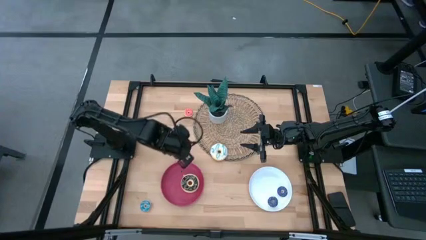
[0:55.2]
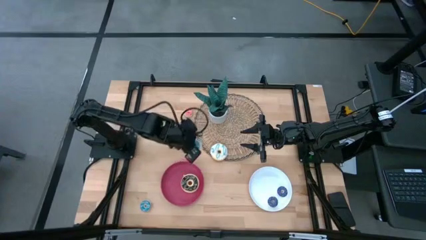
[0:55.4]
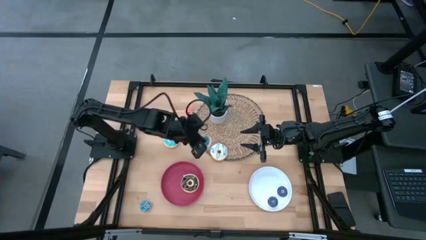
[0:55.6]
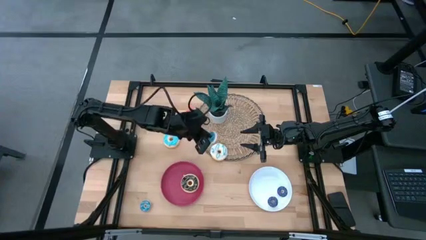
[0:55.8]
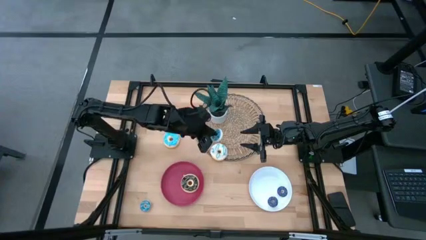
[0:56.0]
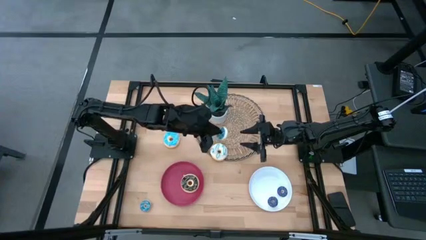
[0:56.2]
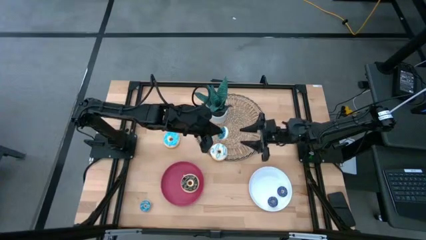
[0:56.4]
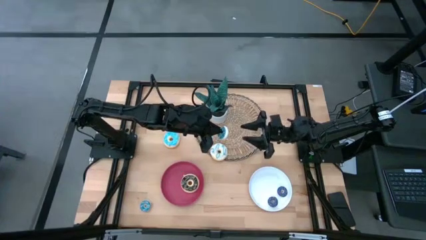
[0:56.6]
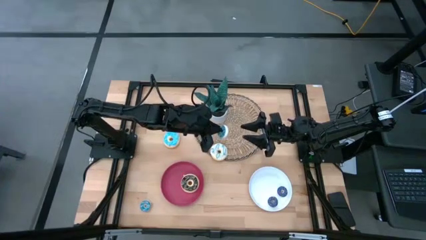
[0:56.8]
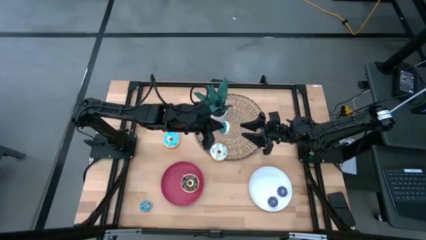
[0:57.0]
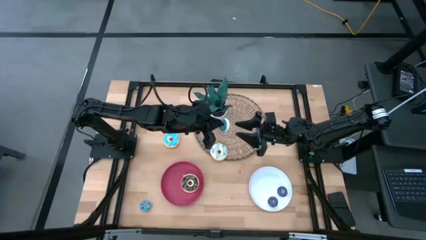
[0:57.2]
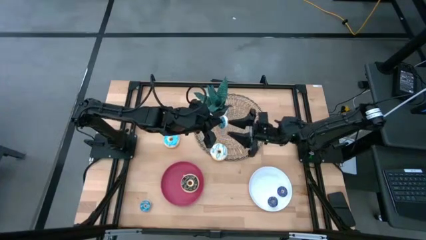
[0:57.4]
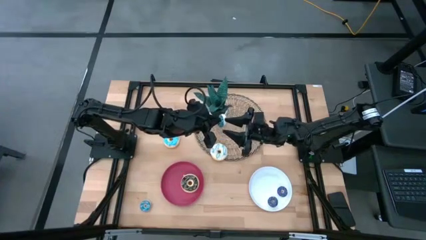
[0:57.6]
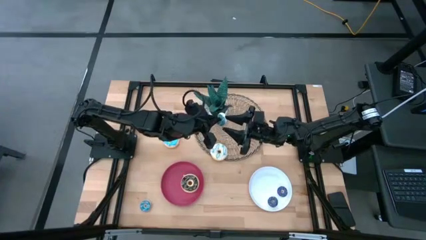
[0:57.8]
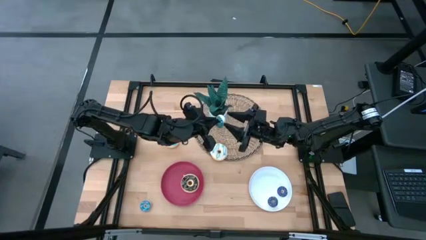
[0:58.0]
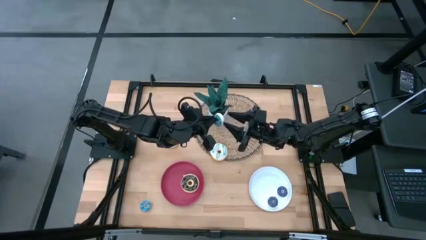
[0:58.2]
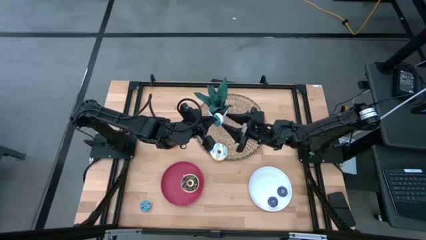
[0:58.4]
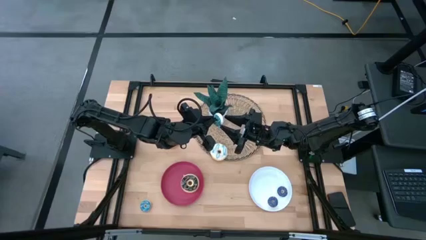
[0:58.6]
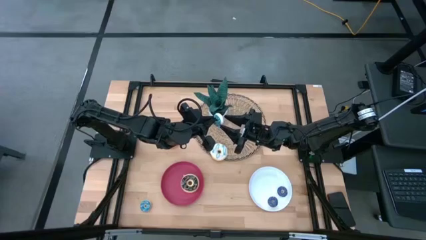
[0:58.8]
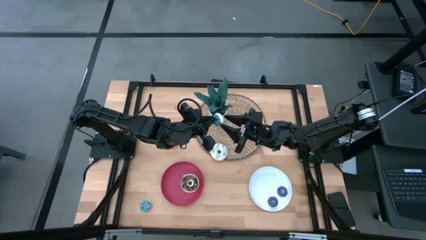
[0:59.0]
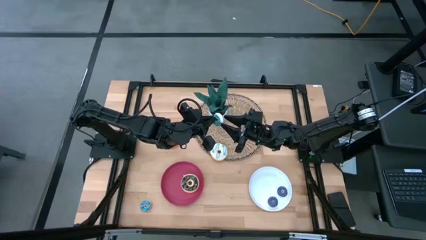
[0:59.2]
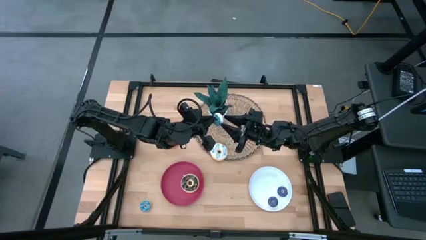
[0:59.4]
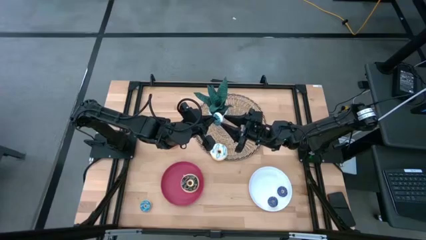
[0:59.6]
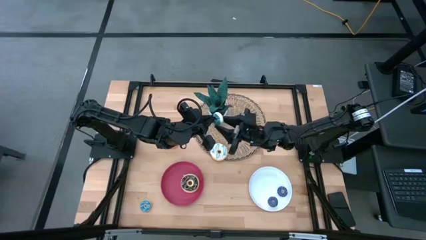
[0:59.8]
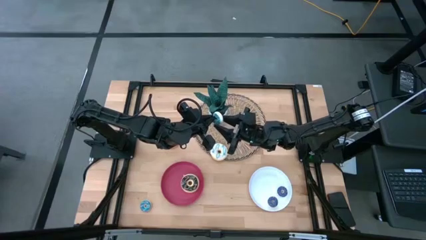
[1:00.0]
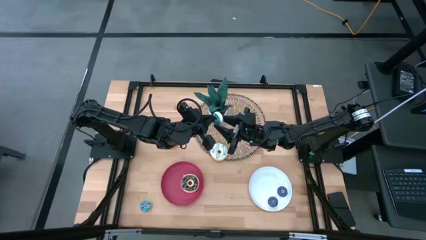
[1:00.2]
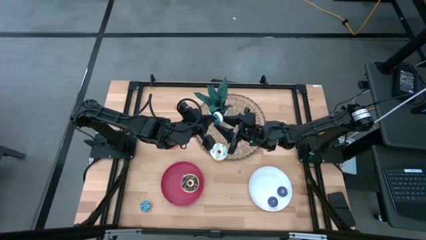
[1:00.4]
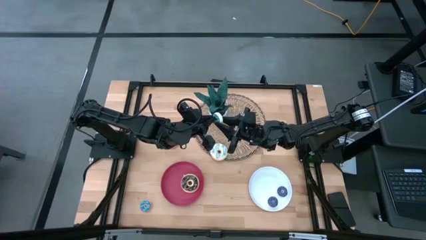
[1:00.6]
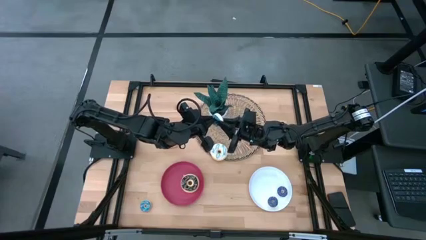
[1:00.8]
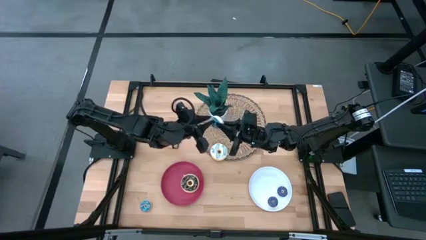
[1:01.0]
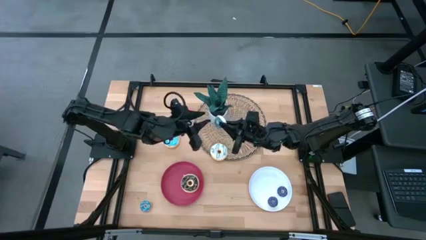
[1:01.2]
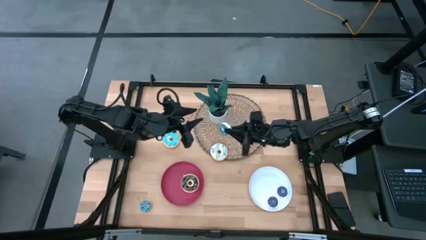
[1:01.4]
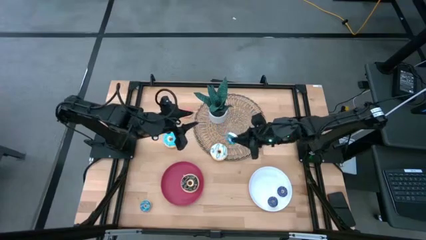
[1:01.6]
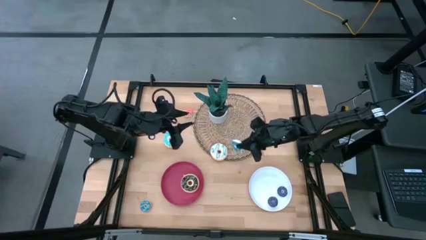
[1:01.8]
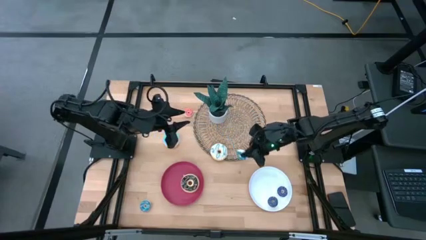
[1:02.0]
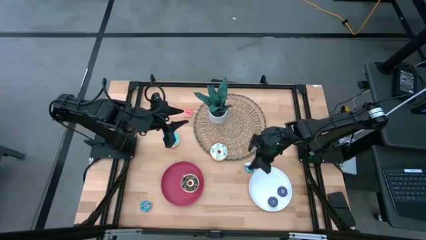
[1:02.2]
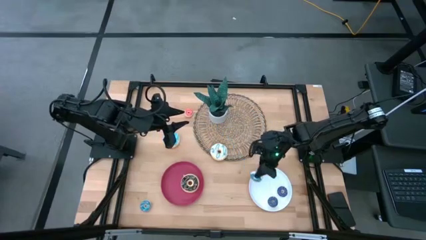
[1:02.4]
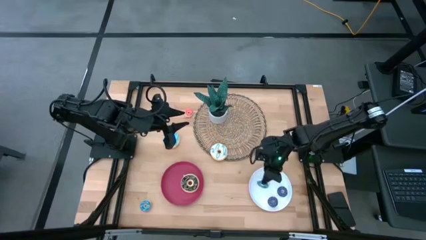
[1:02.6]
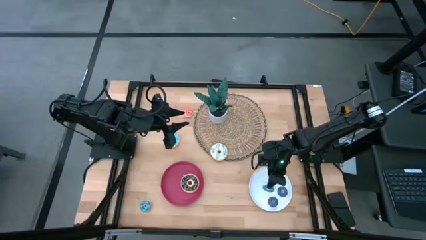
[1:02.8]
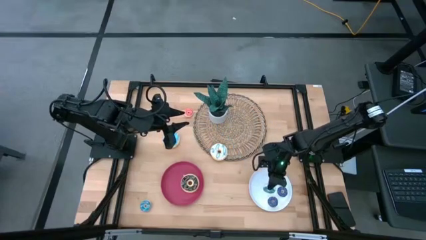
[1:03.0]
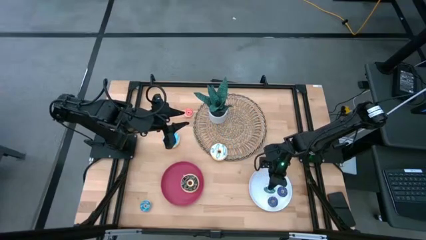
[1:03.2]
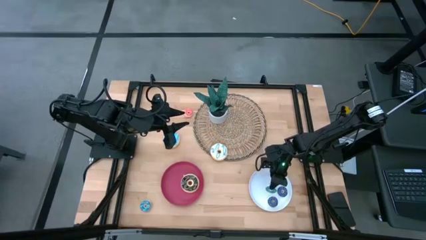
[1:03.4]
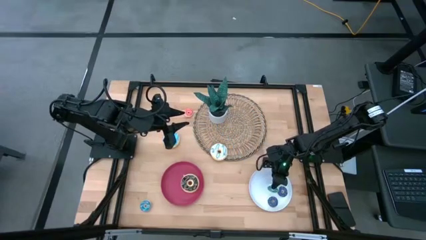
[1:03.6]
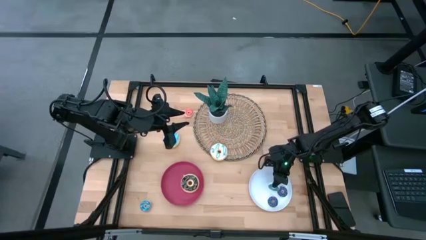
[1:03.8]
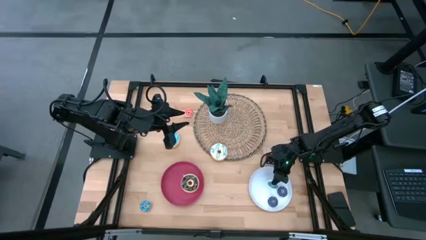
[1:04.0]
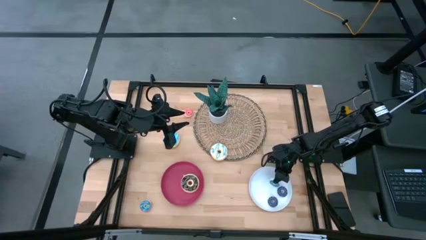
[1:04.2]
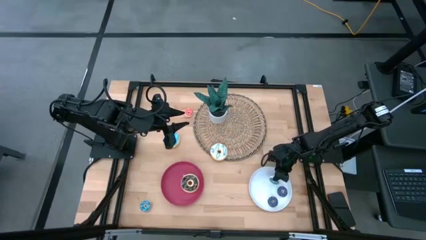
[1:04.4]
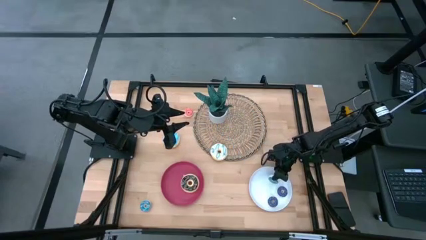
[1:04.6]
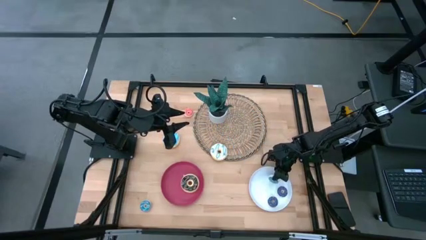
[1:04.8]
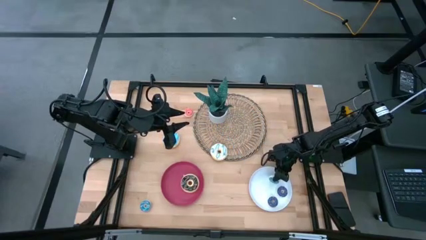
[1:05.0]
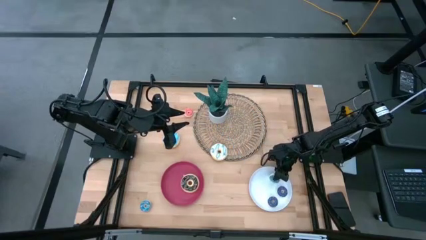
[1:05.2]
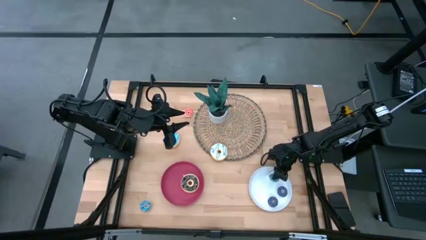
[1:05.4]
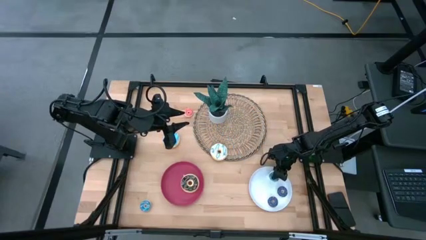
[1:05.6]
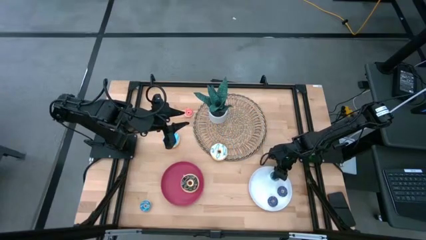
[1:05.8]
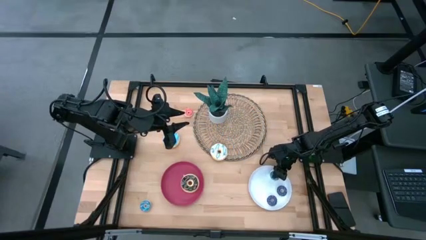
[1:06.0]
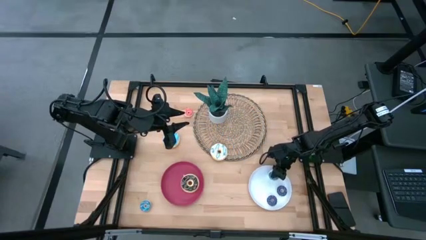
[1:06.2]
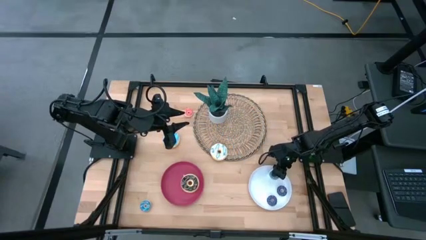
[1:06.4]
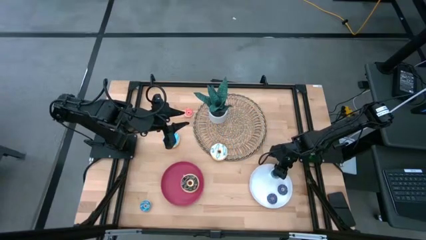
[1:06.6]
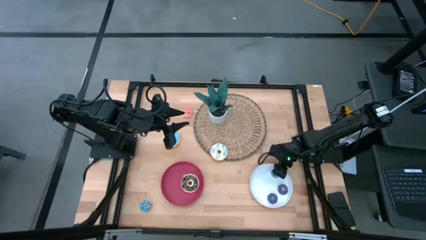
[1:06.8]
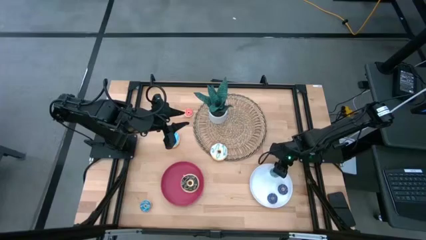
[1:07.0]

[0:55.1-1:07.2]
Task: Pick & Place donuts
Put the top blue donut on the white plate
